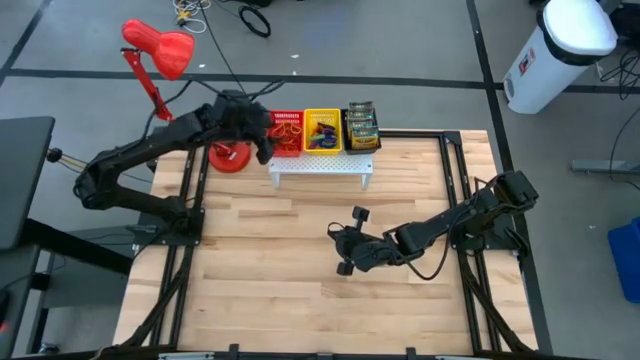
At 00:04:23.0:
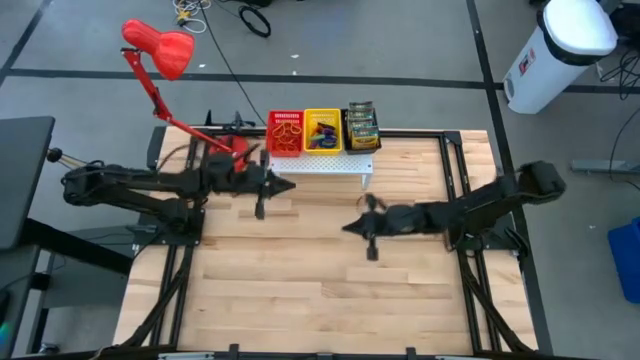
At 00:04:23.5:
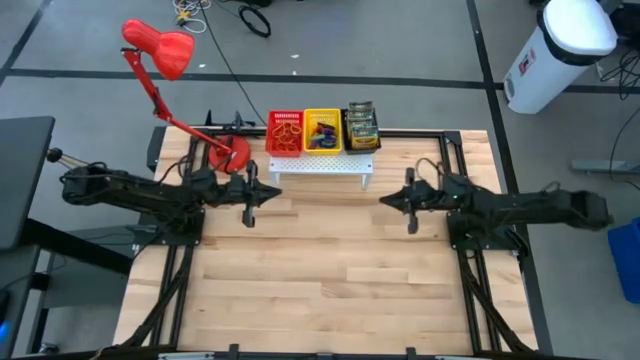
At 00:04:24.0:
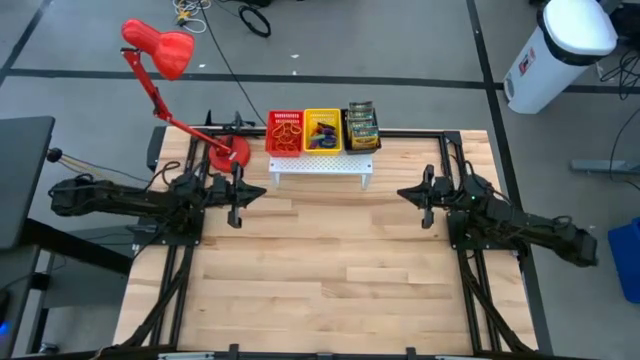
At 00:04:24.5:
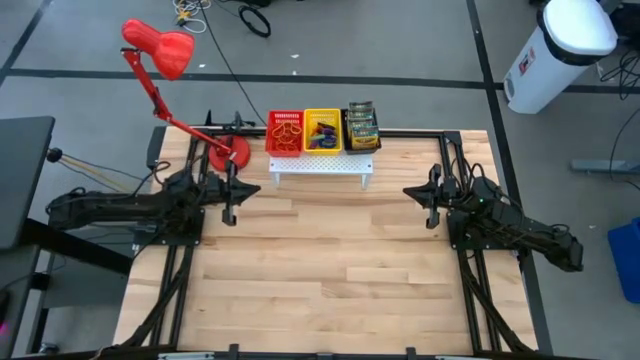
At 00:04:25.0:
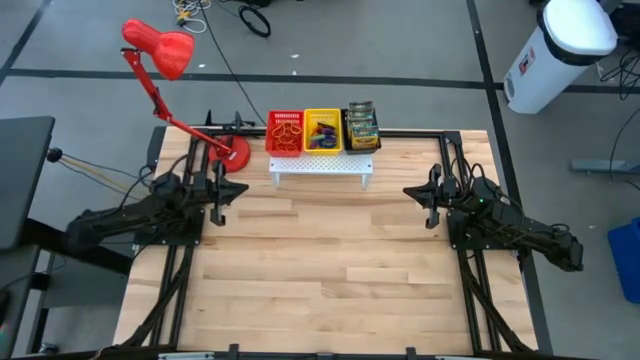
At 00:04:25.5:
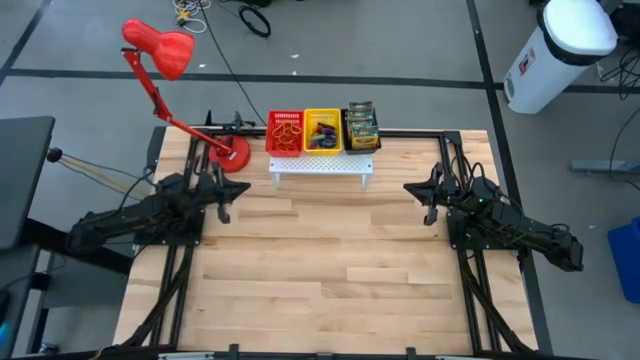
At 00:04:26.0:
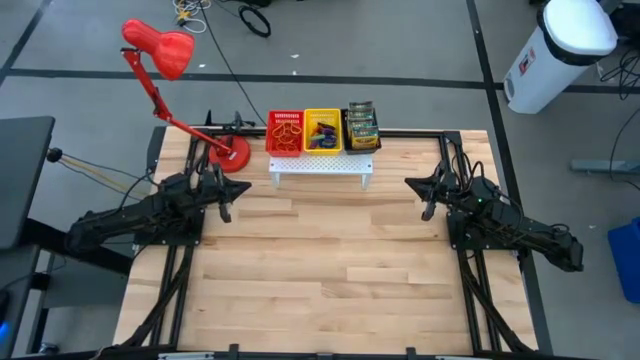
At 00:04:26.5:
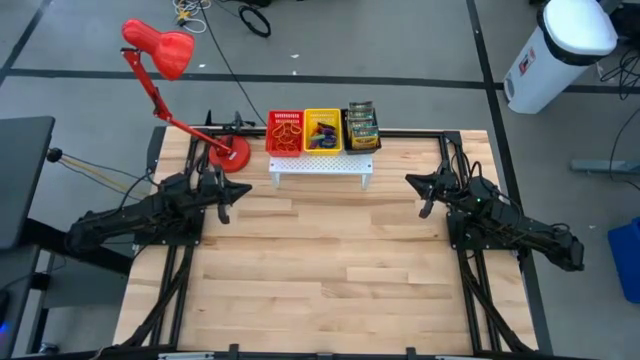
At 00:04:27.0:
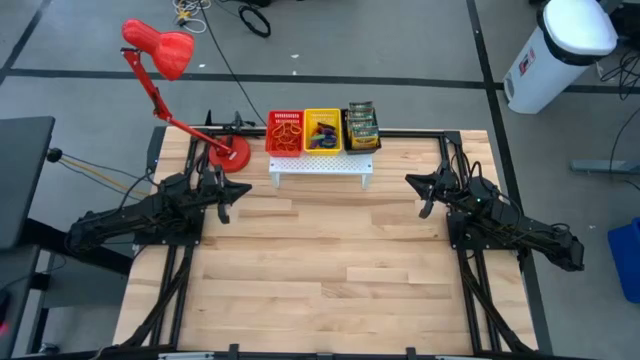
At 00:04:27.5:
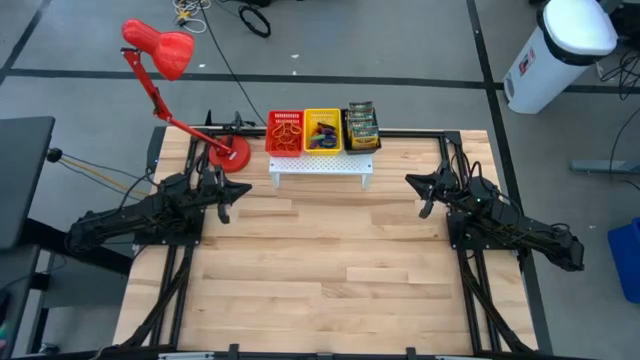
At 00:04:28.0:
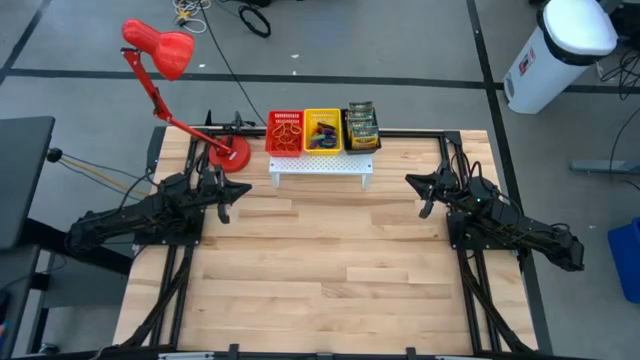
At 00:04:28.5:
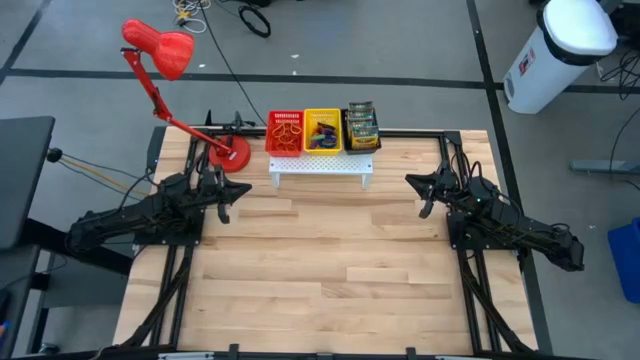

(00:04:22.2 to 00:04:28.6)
Task: Pick & Place Office Desk Supplies
Return to Home Position

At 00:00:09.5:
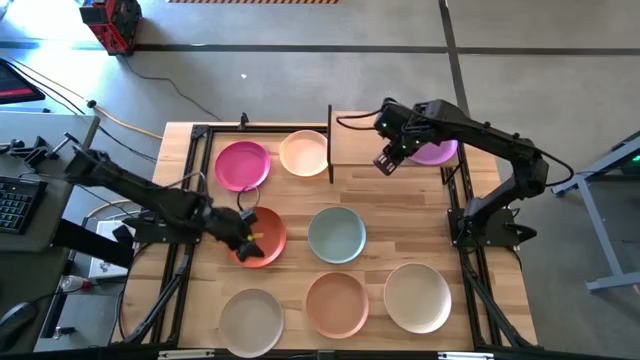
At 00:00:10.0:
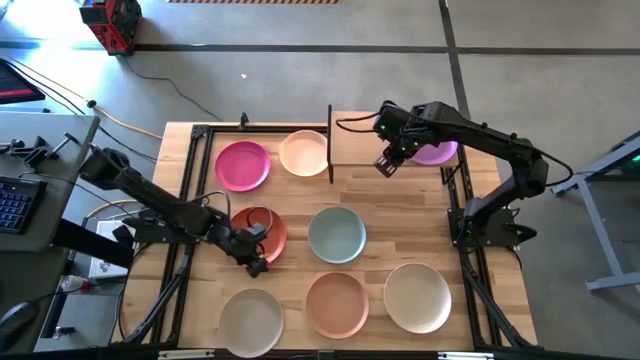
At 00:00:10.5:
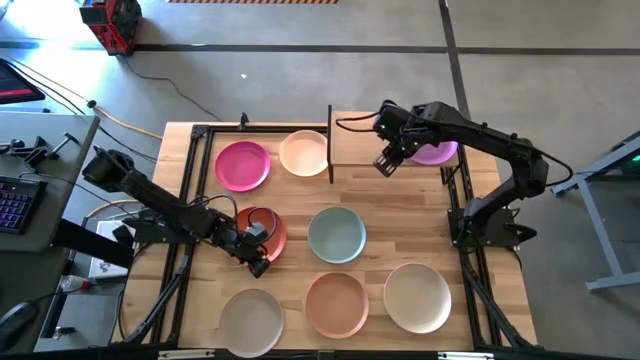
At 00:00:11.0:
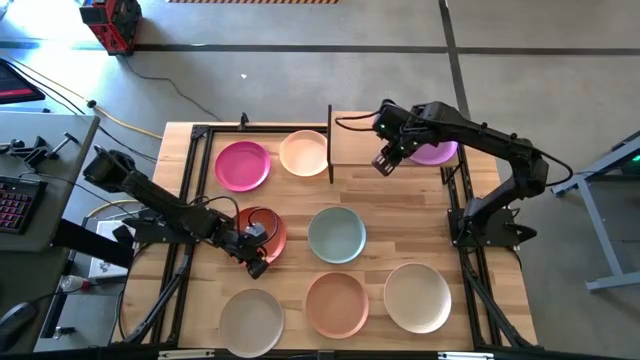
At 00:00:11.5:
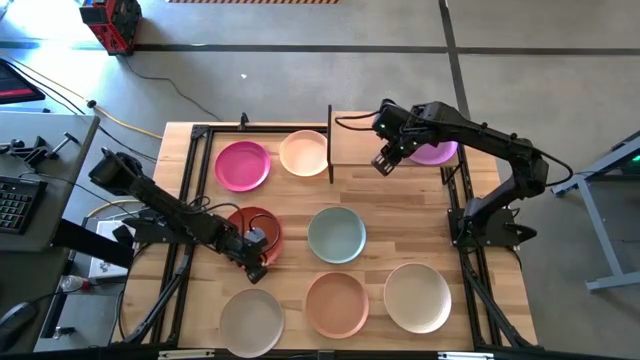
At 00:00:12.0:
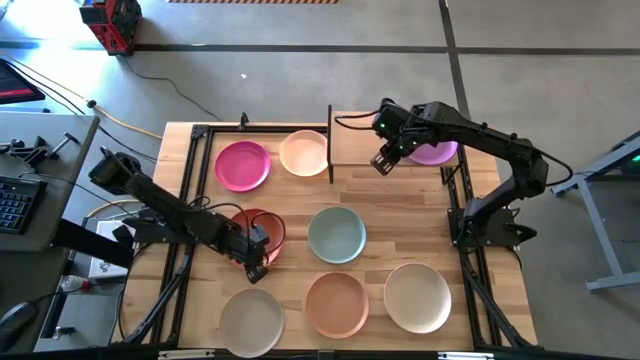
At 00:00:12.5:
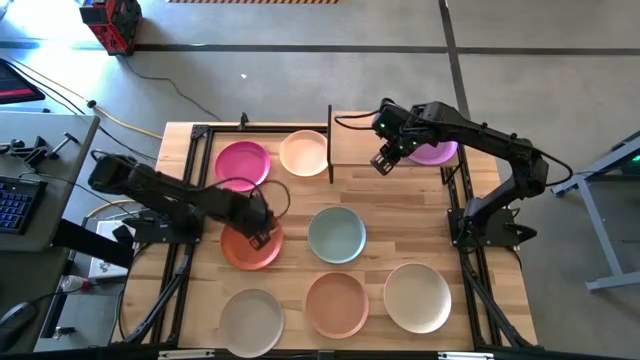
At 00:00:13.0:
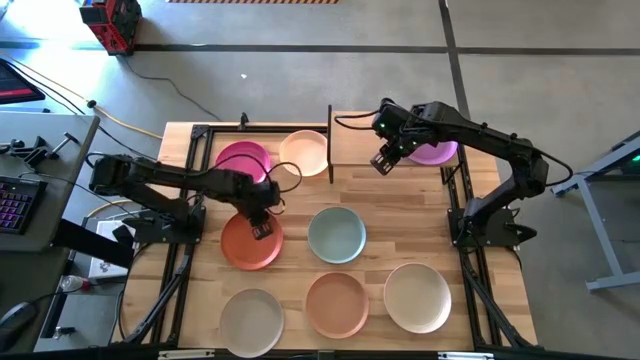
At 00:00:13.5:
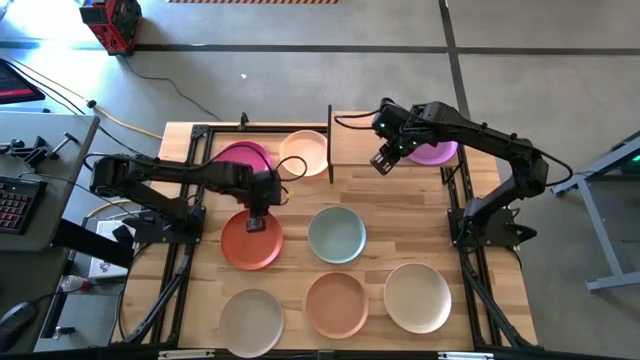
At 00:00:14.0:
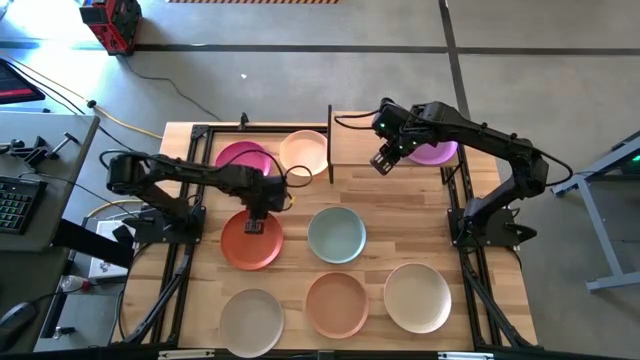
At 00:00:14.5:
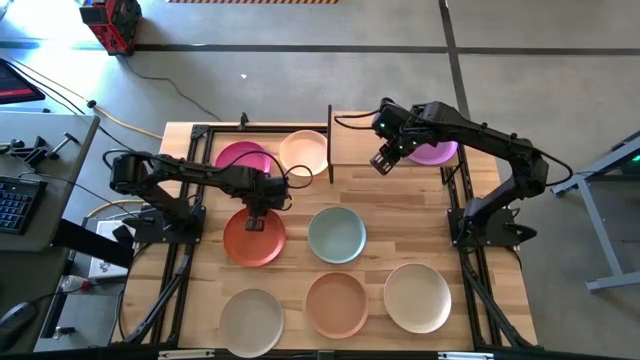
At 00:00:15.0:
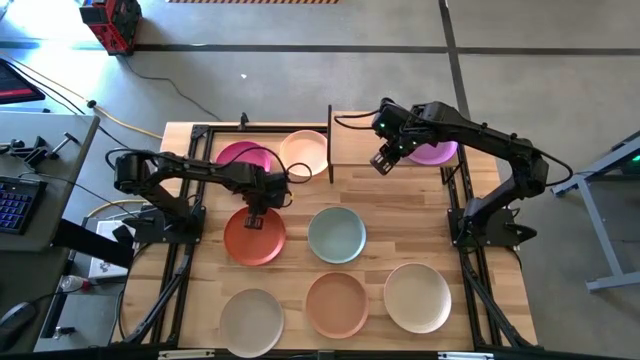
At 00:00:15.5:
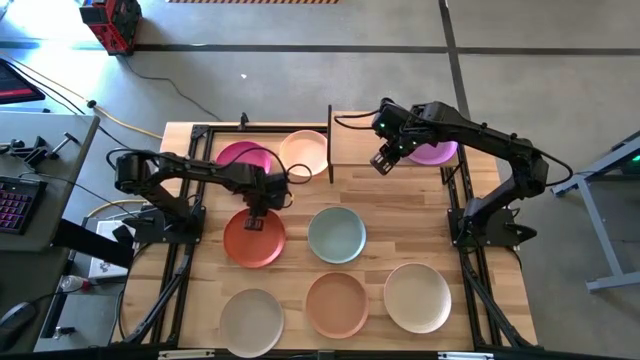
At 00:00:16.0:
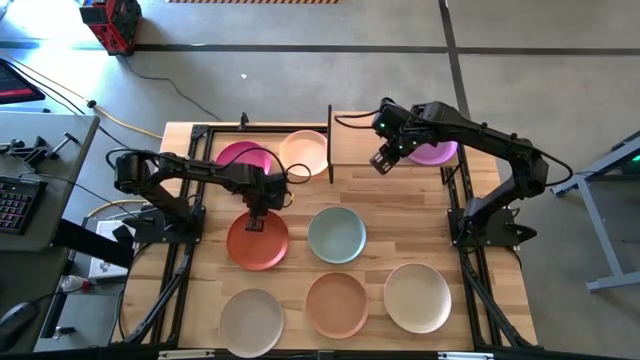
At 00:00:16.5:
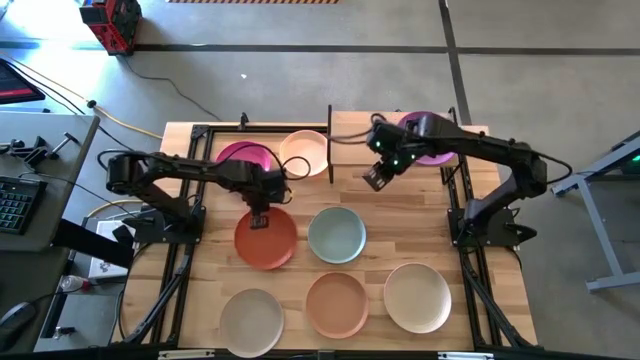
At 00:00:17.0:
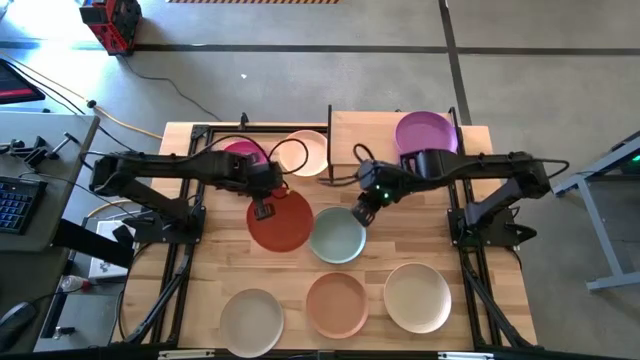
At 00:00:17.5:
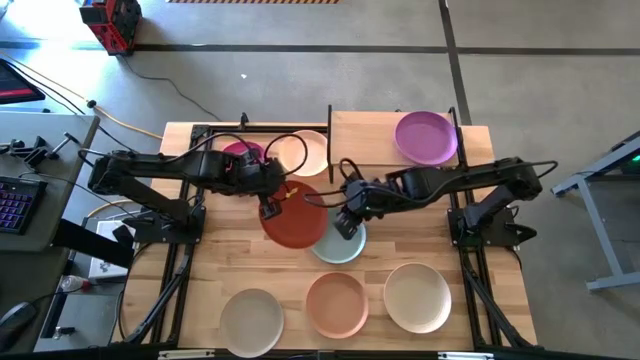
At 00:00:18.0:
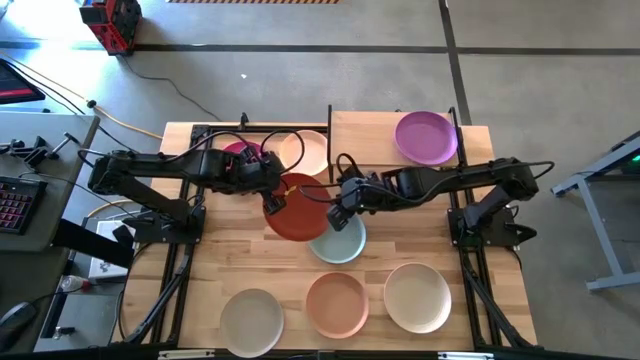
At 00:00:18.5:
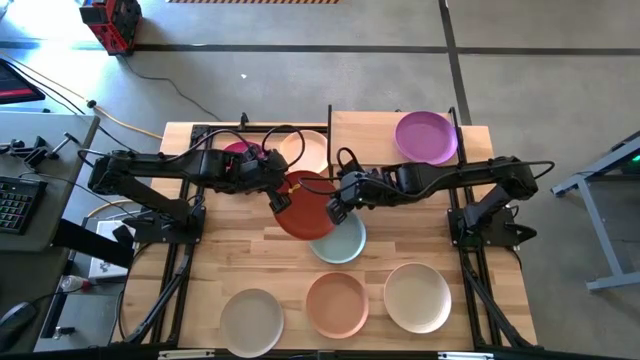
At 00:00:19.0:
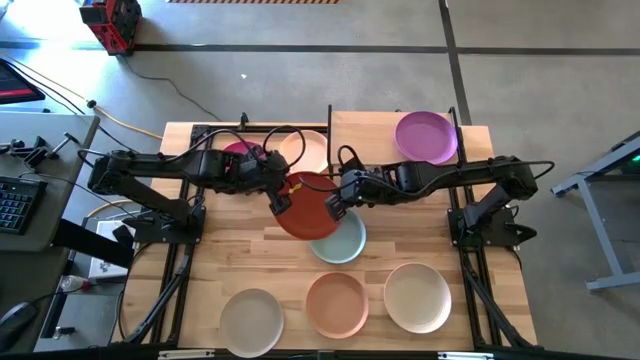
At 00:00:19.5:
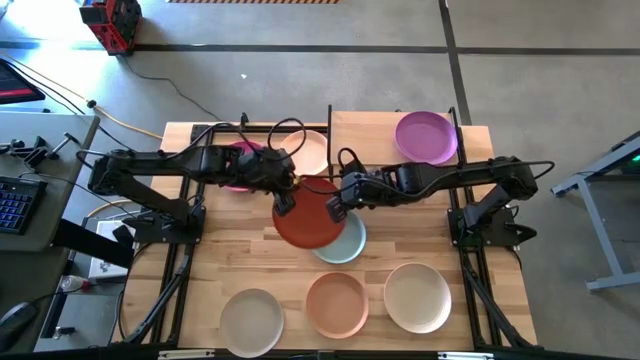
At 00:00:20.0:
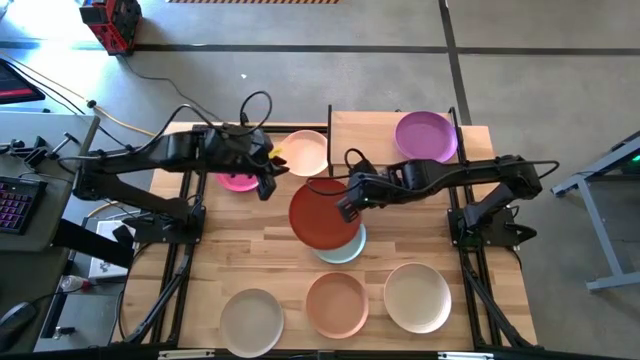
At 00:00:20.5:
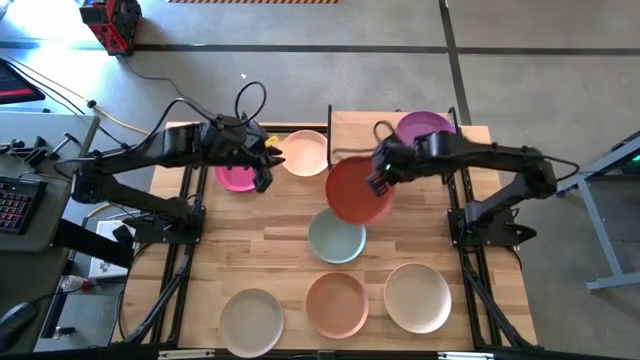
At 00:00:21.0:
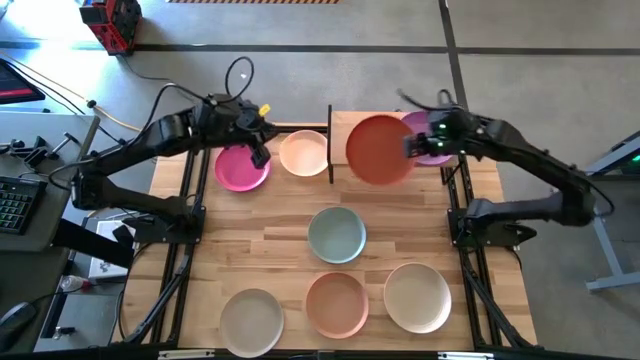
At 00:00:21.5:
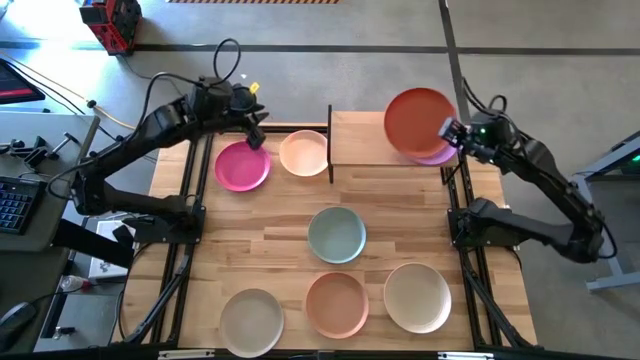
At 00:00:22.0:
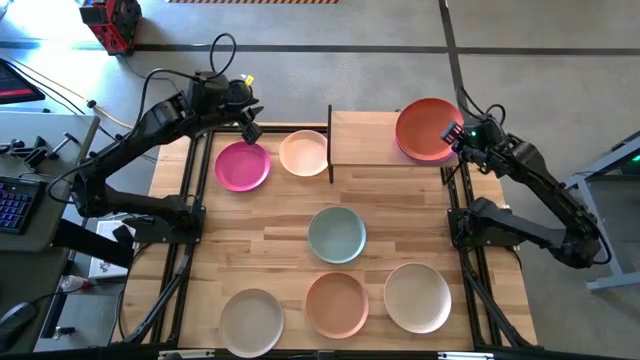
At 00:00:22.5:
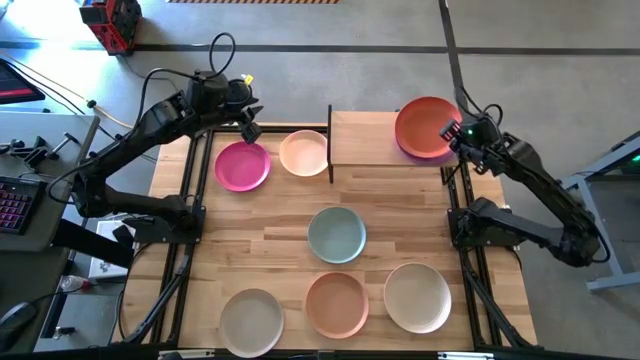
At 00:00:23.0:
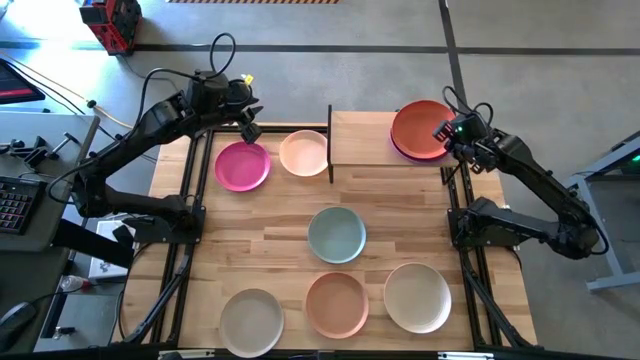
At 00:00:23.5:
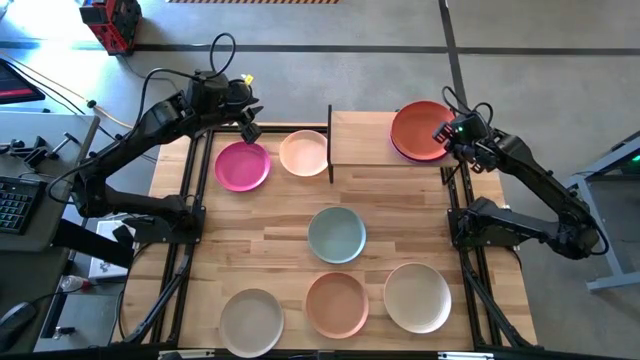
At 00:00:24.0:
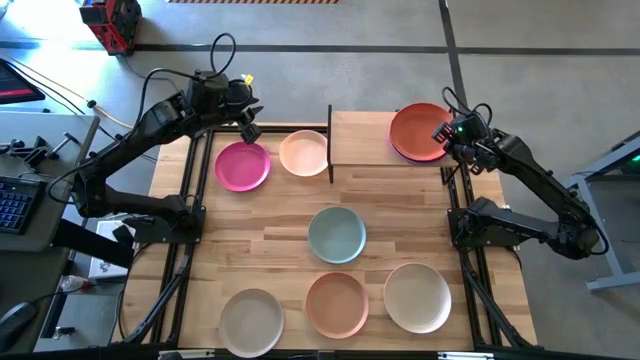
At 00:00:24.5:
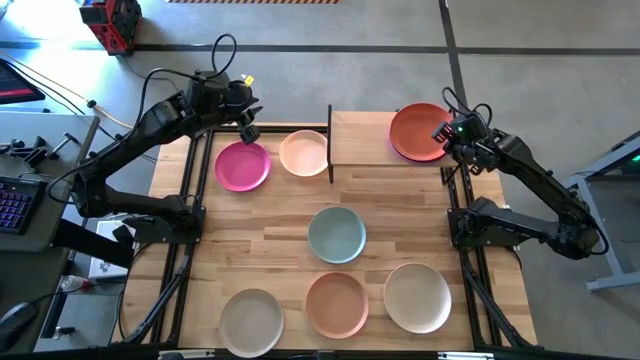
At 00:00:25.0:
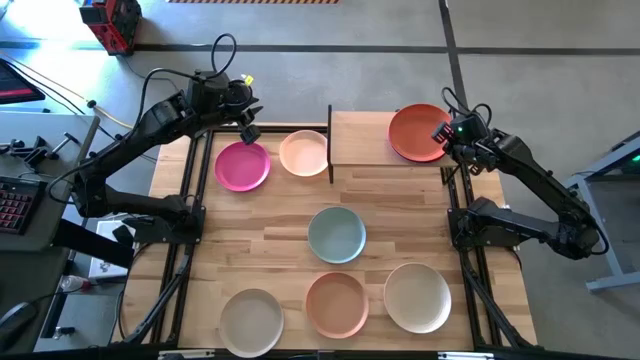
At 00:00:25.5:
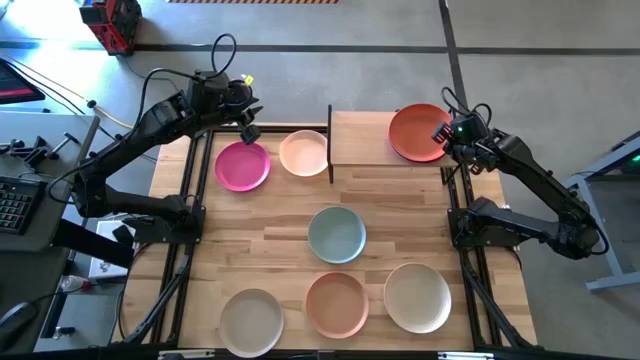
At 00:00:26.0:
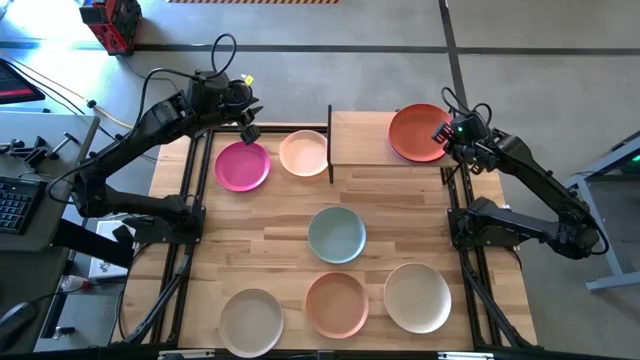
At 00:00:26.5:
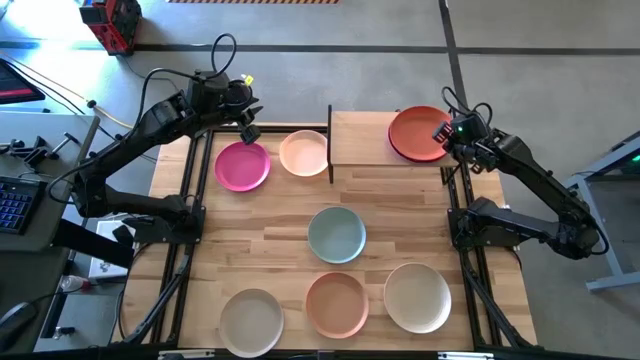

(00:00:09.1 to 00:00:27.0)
Task: Place and stack plates onto a shelf
Stack the orange plate on top of the violet plate on the shelf
